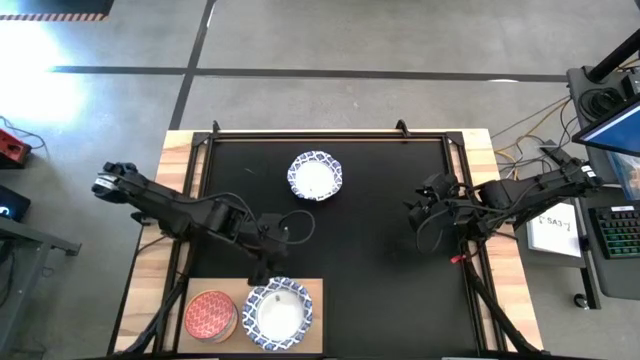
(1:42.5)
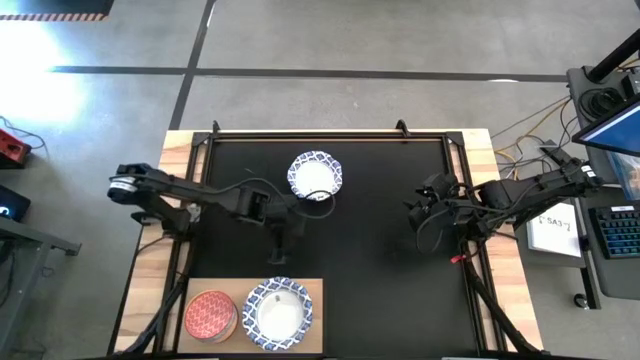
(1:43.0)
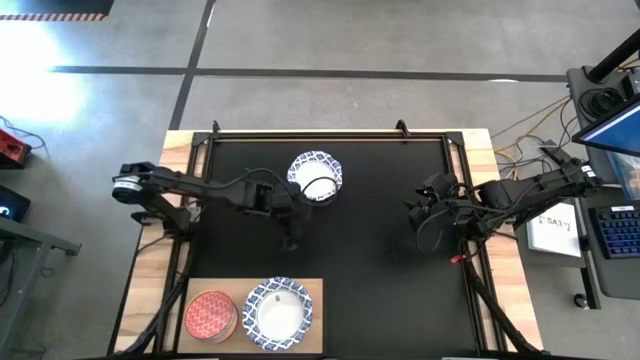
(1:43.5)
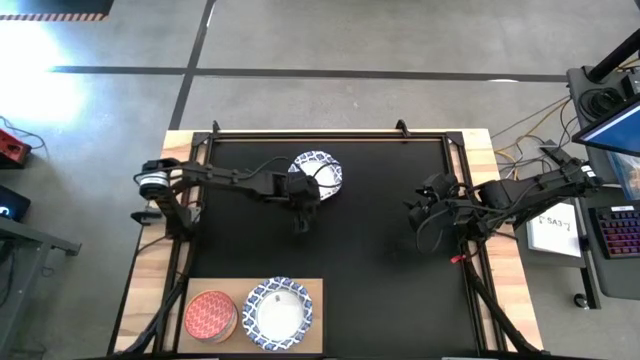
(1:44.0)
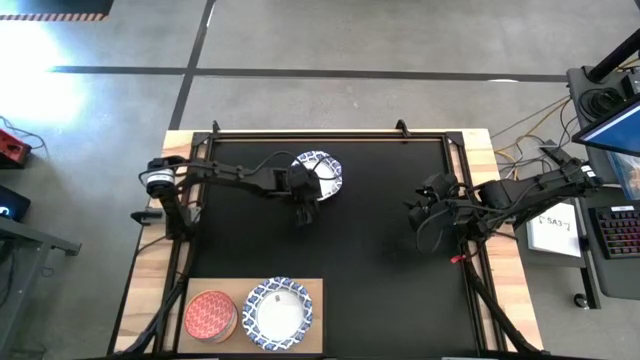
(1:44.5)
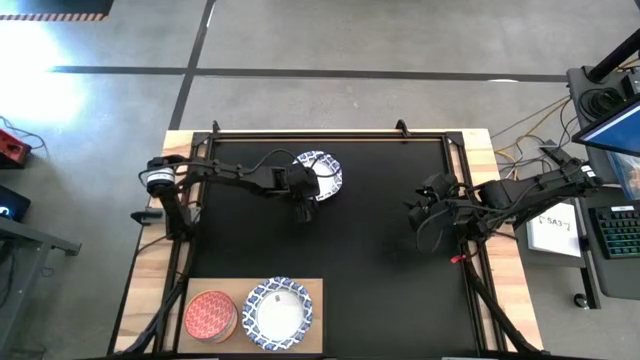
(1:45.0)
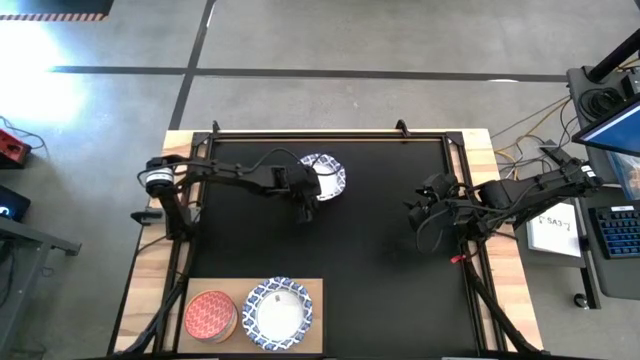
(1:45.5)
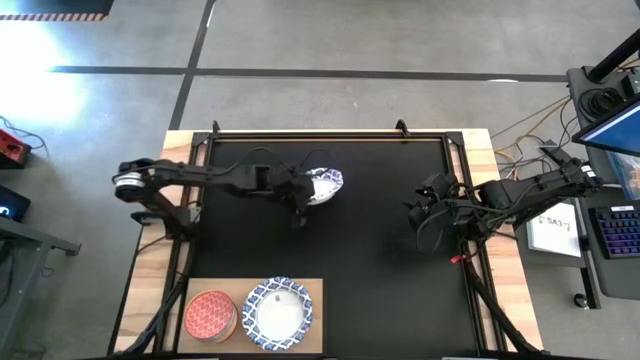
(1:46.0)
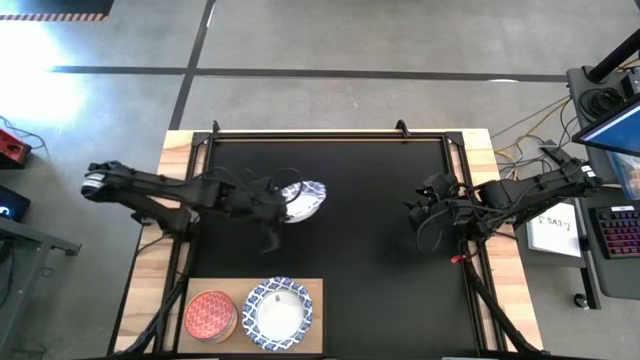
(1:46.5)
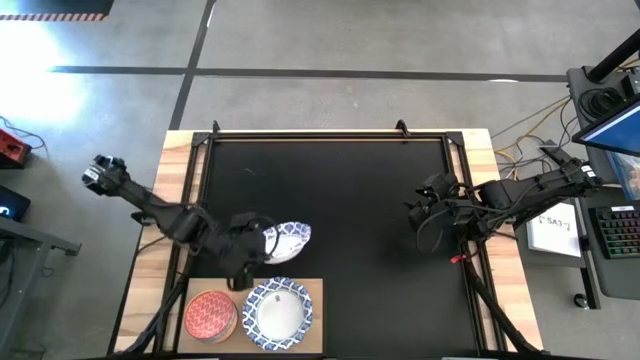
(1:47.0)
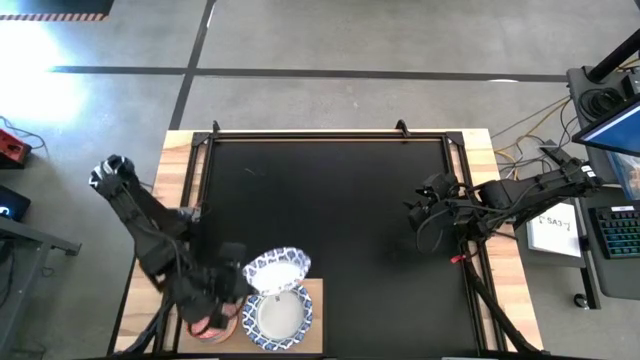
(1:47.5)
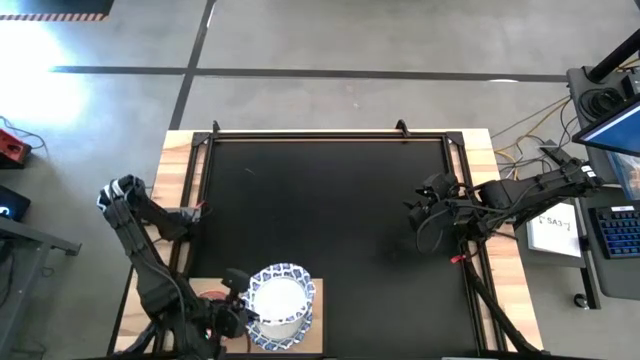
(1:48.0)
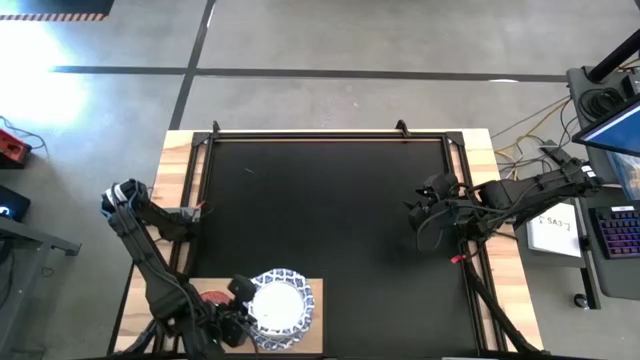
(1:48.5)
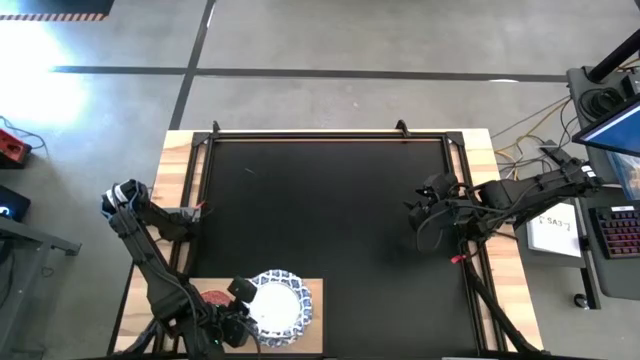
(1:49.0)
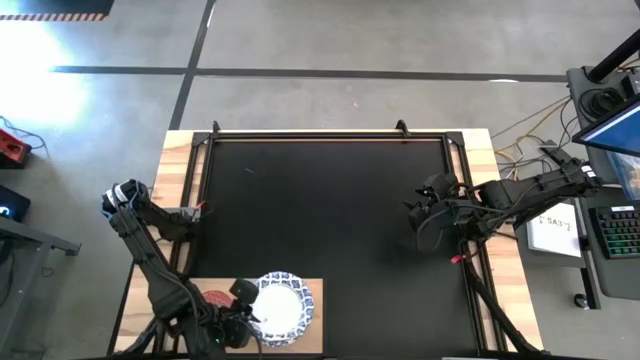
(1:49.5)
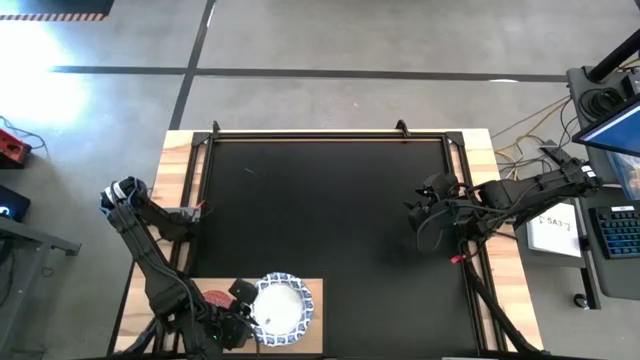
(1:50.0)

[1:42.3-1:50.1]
Task: Place and stack bowls onto a shelf
Stack the white patterned bowl on top of the white patterned bowl on the shelf

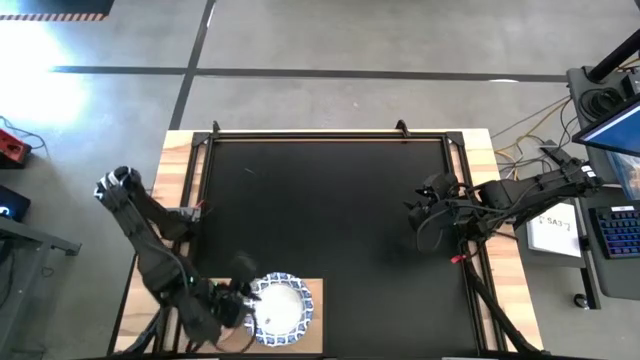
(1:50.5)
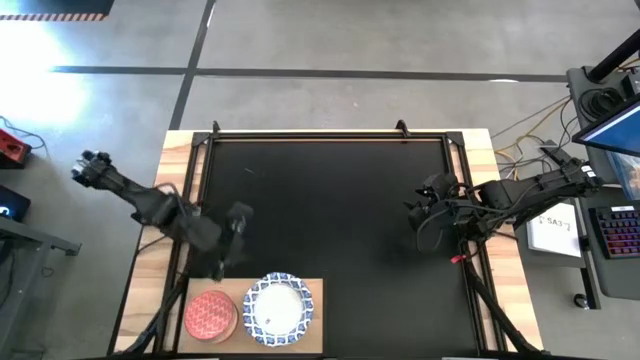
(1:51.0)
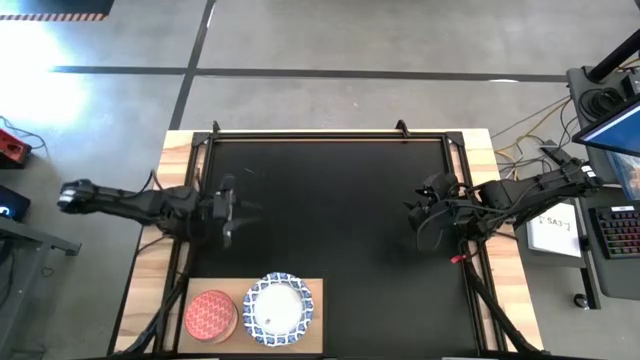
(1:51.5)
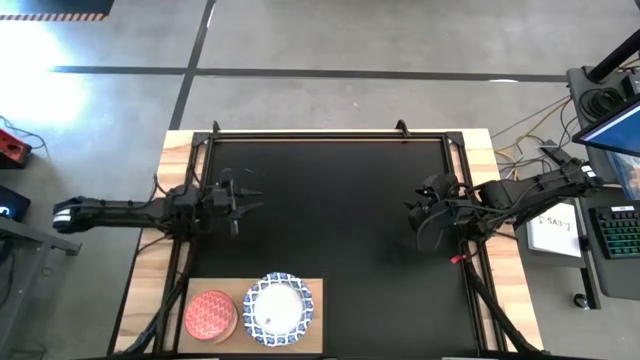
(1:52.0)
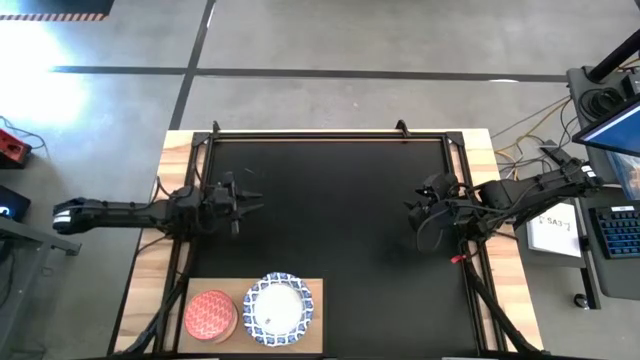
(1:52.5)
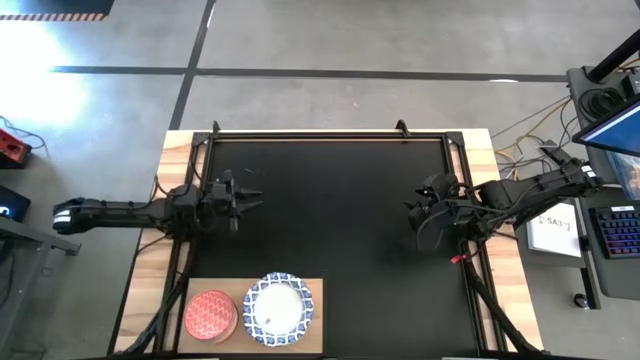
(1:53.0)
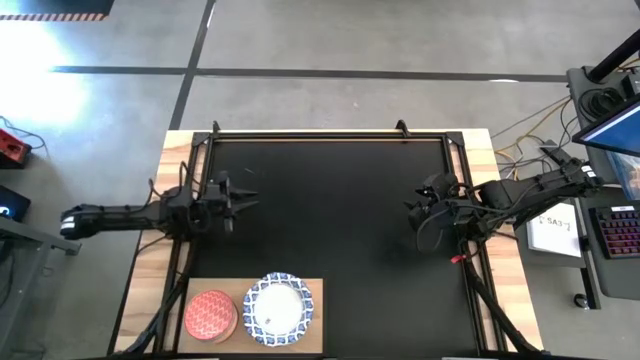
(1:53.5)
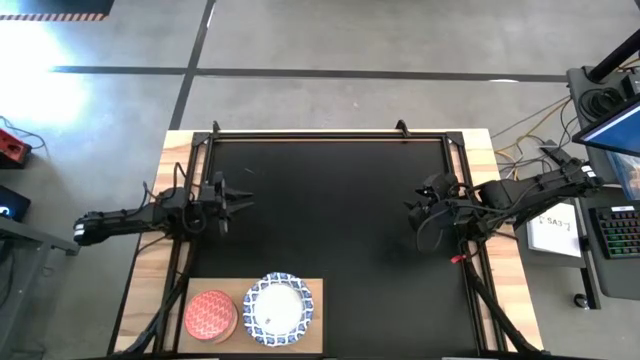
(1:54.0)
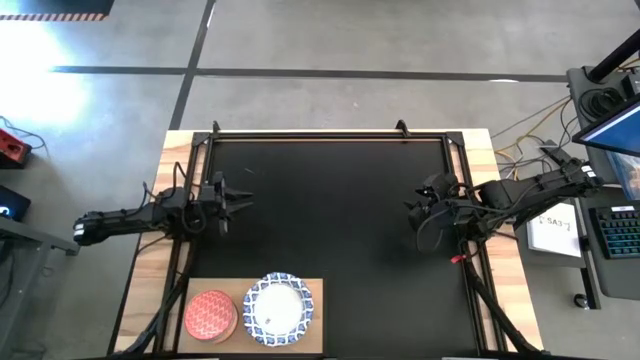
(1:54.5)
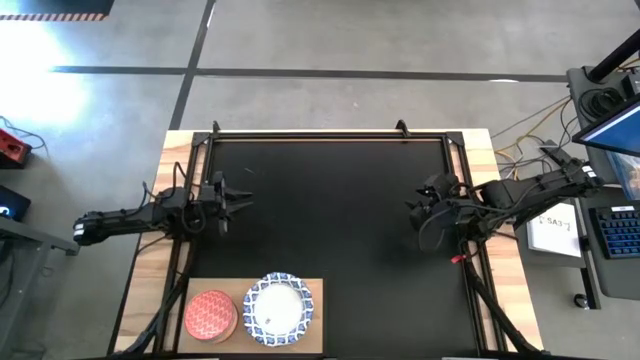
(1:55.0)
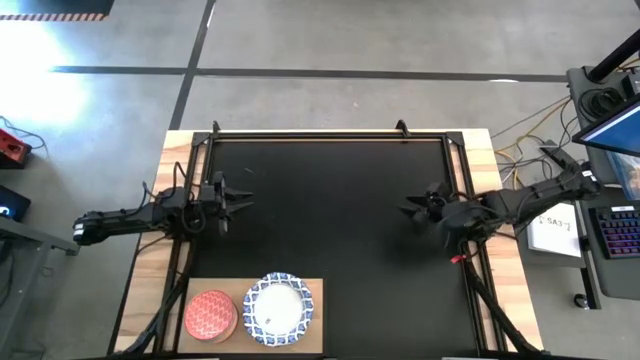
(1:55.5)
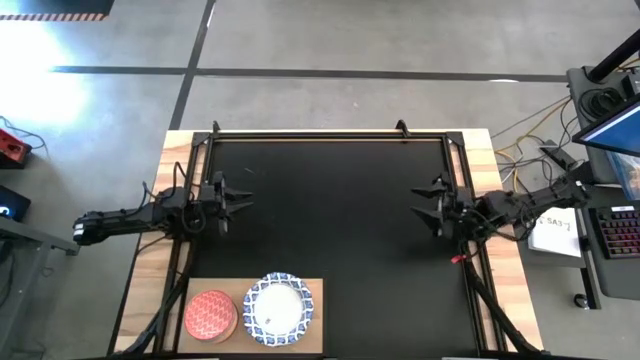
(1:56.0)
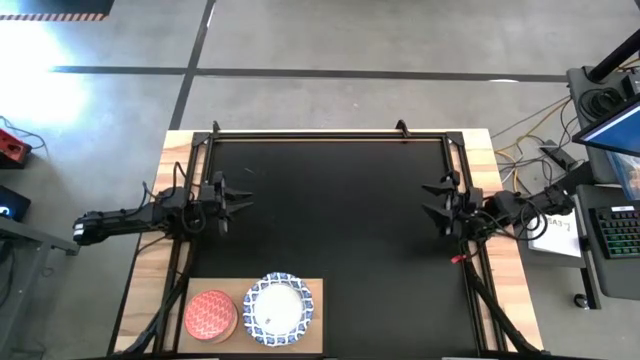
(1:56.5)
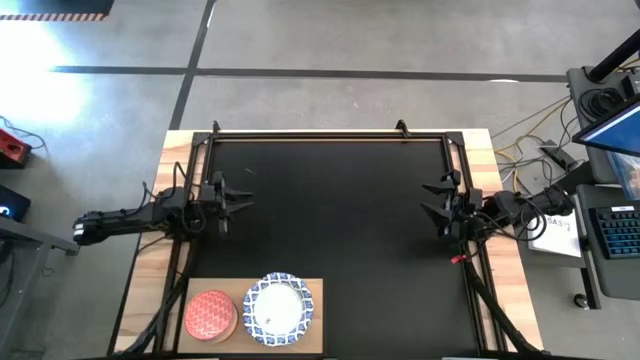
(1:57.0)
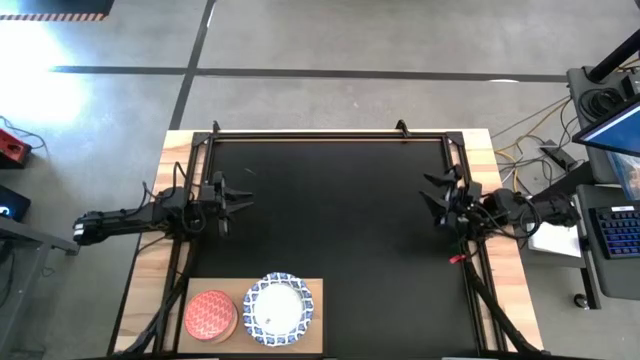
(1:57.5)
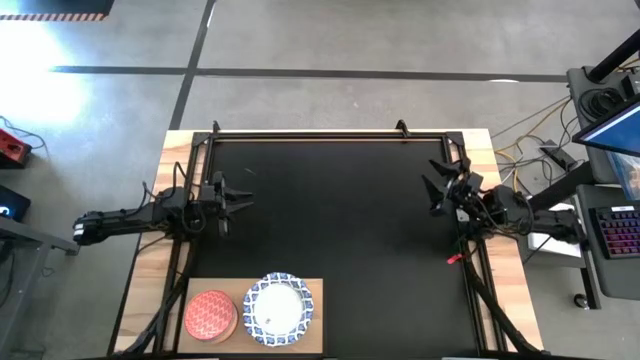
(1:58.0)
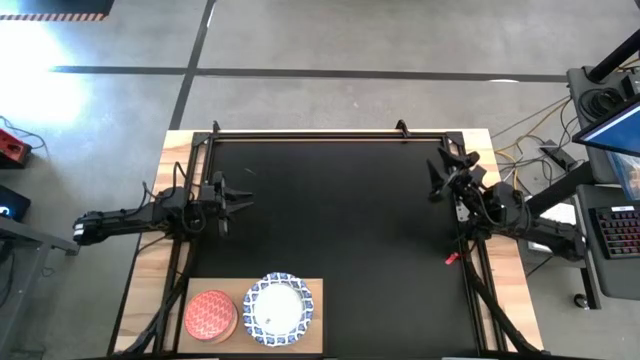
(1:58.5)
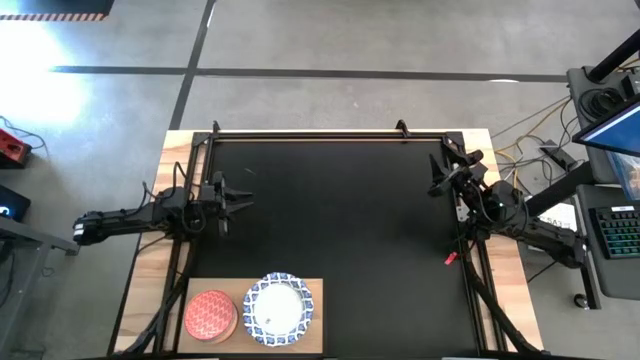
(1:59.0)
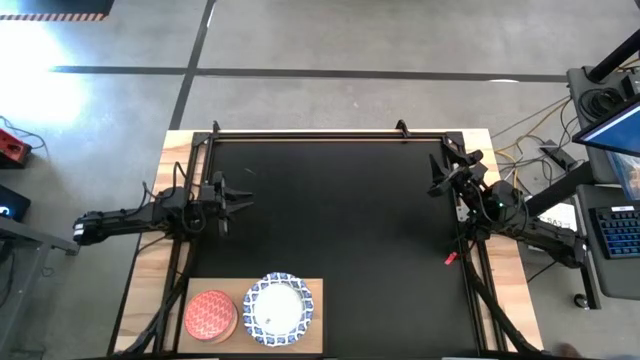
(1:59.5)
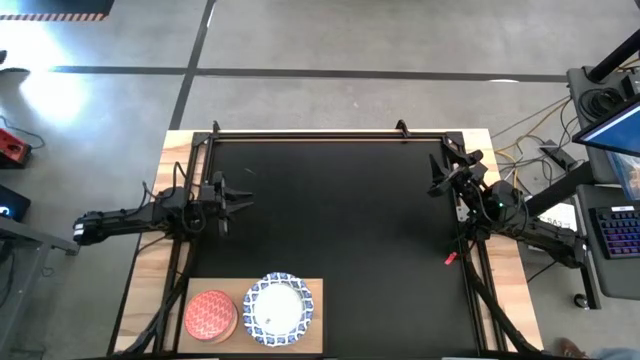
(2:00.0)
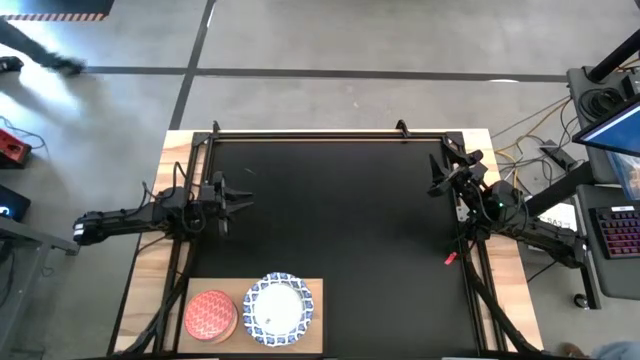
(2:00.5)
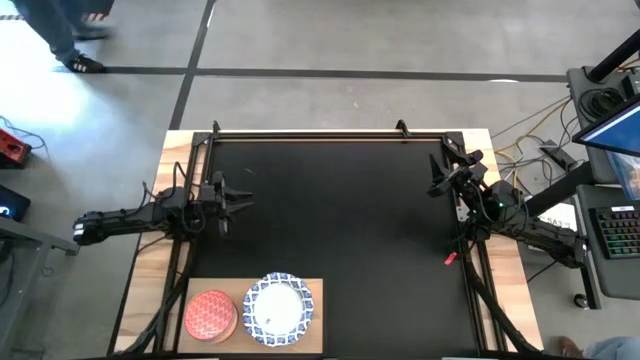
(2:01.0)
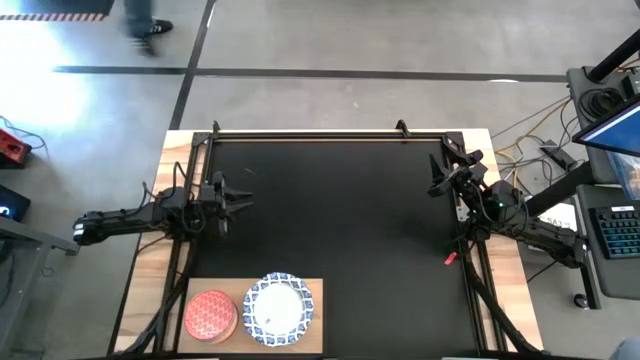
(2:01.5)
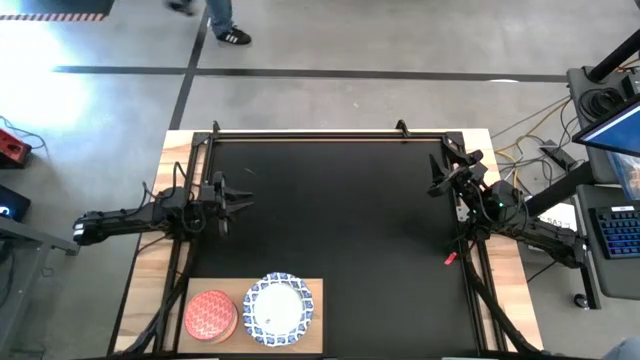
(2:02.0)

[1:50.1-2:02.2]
Return to Home Position
